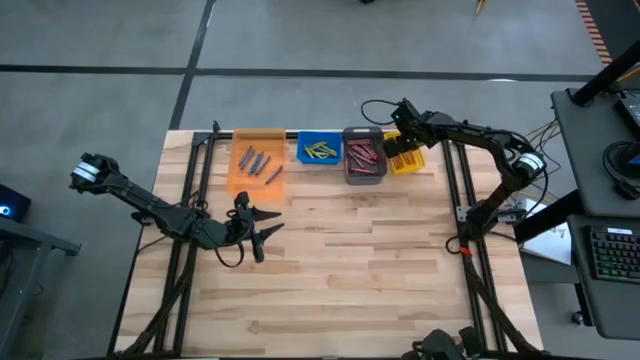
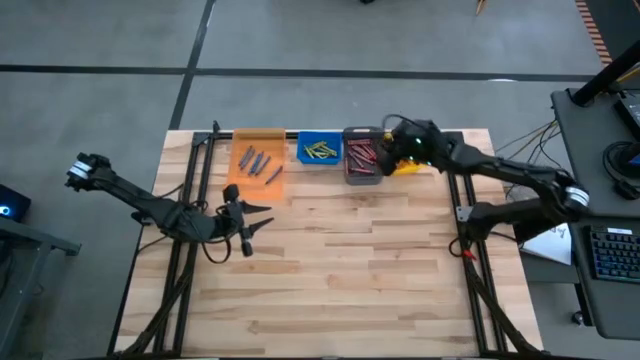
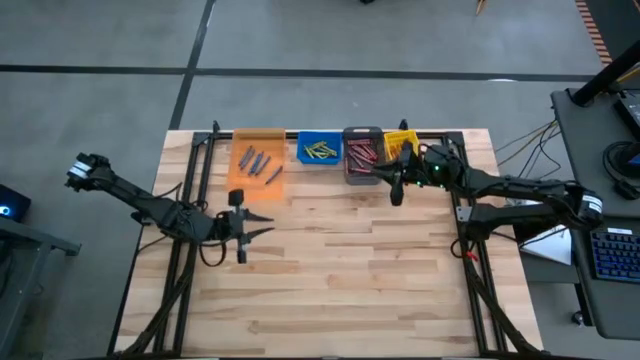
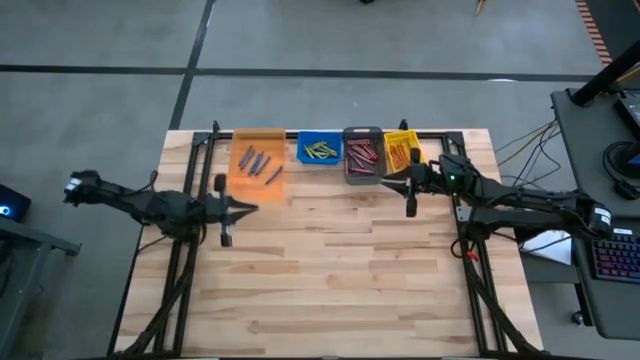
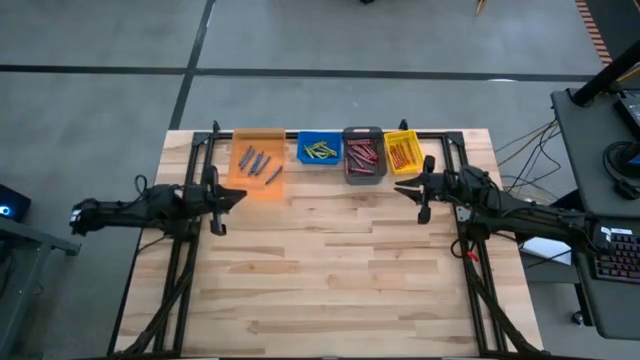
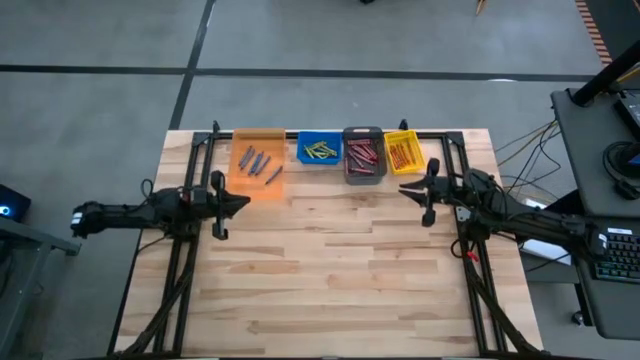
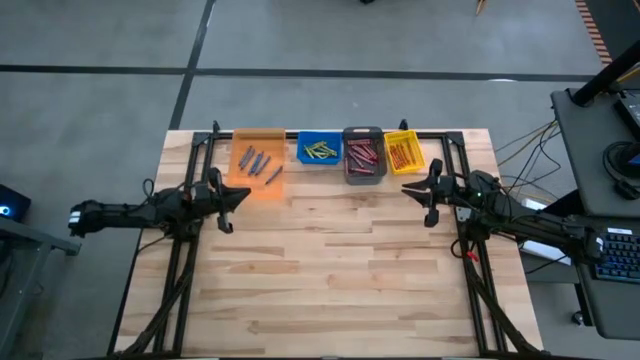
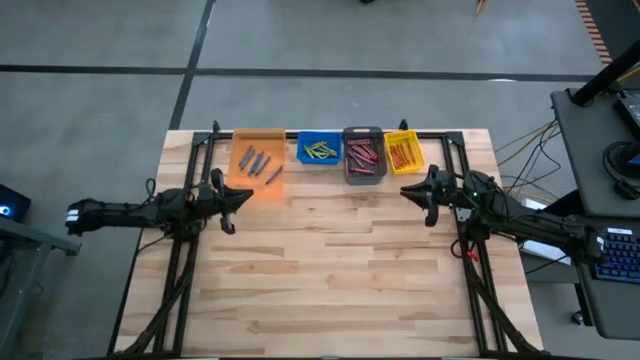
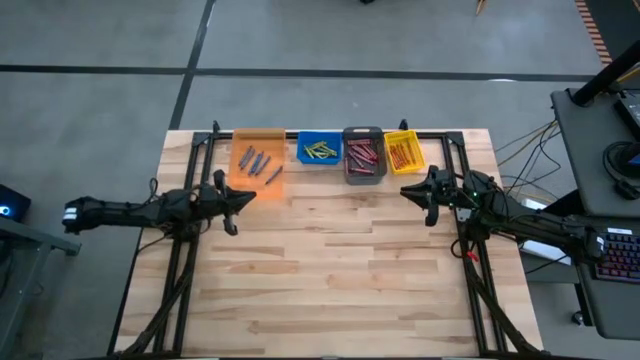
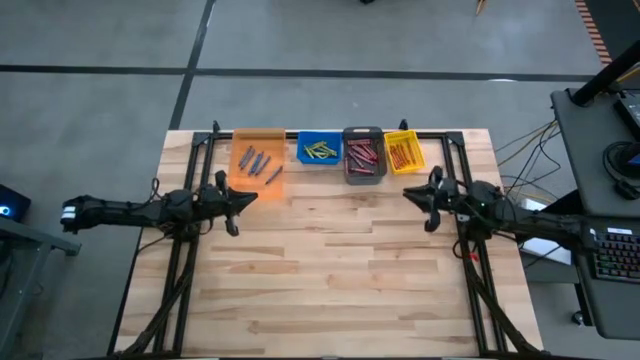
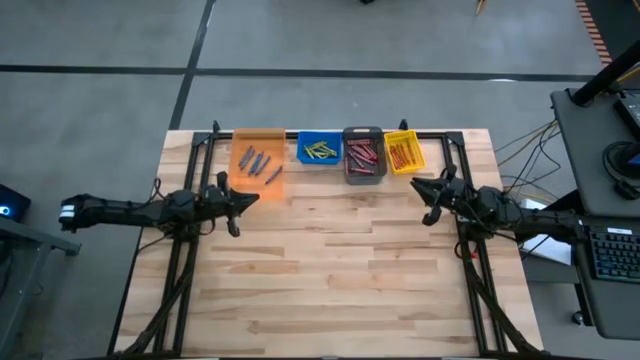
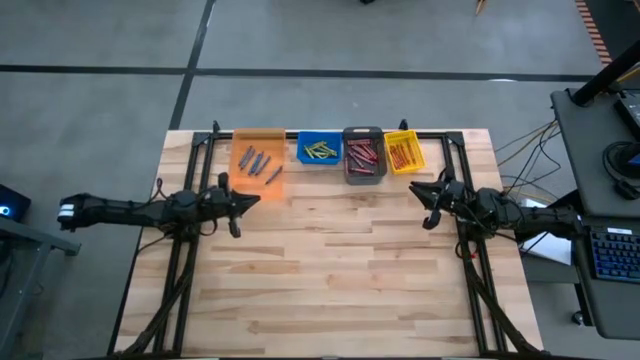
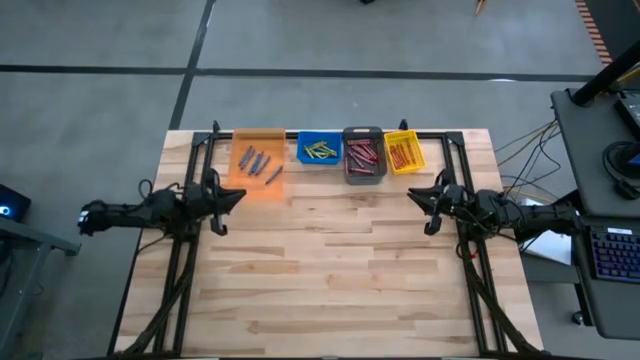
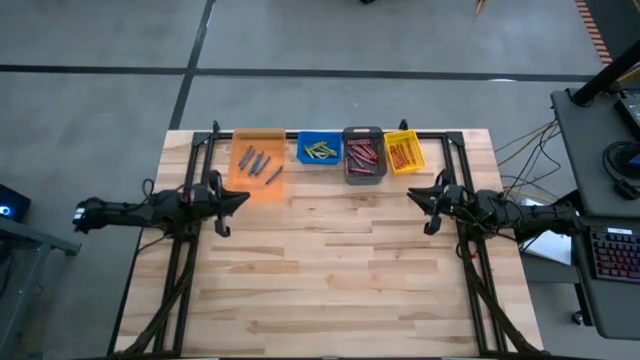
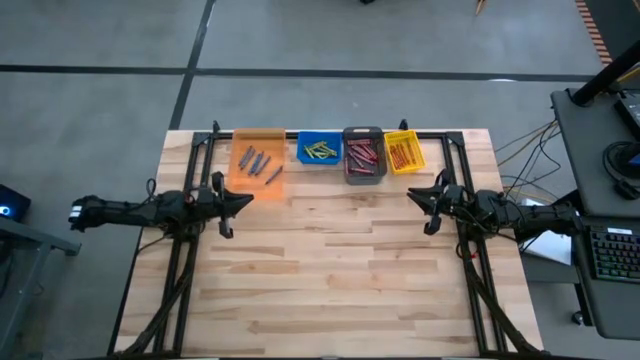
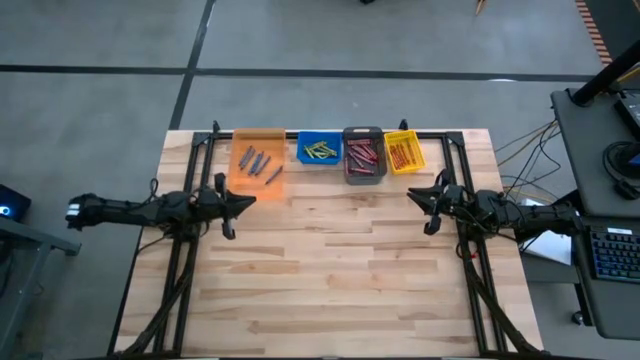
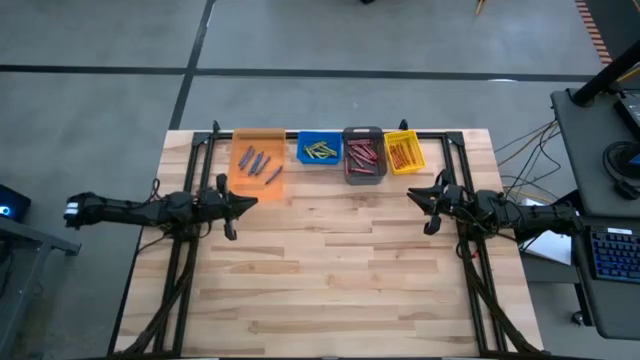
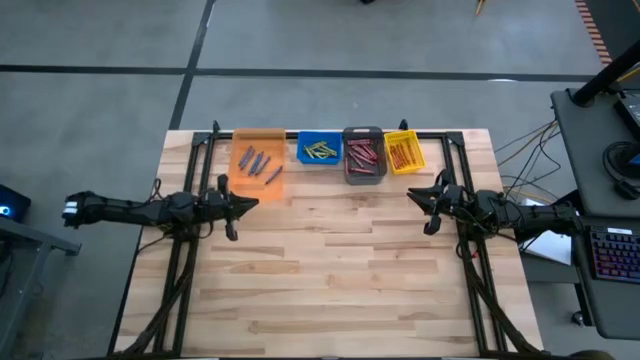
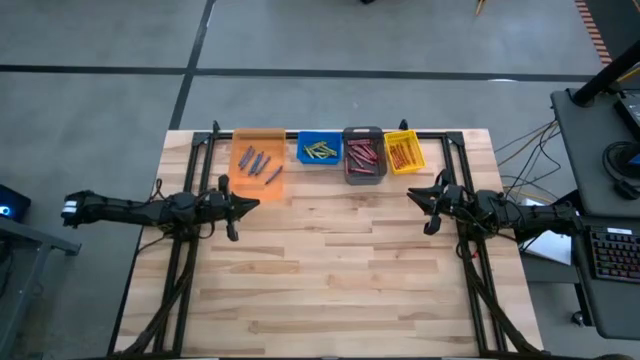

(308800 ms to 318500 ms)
Task: Sort crayons
Return to Home Position

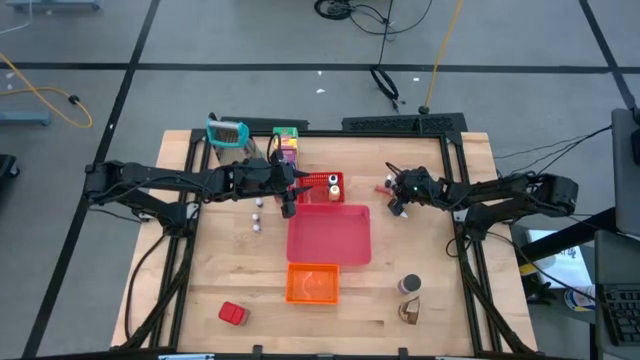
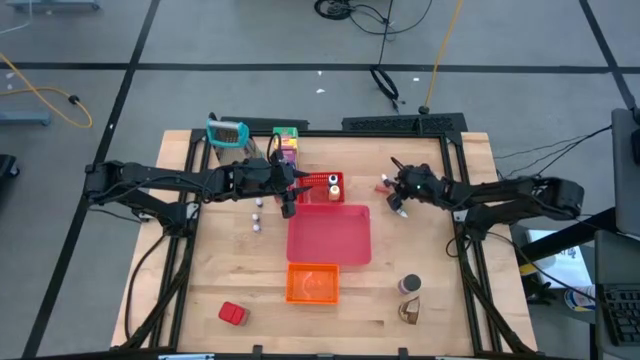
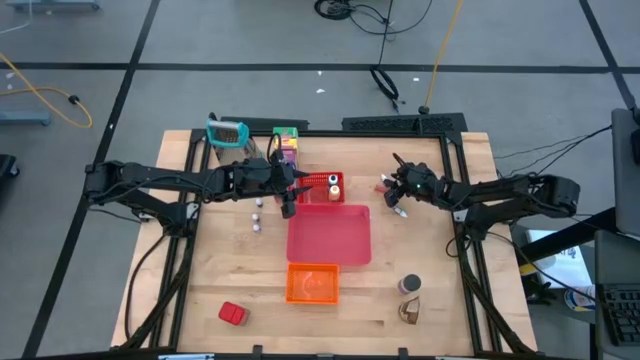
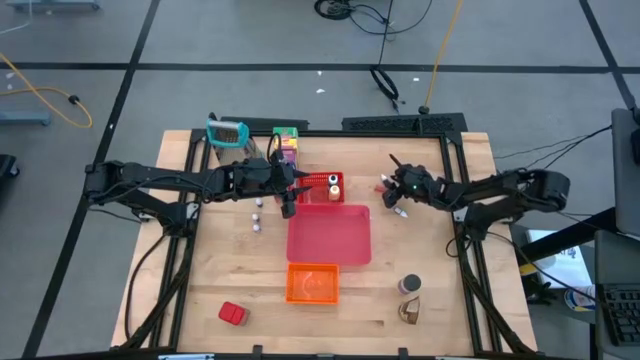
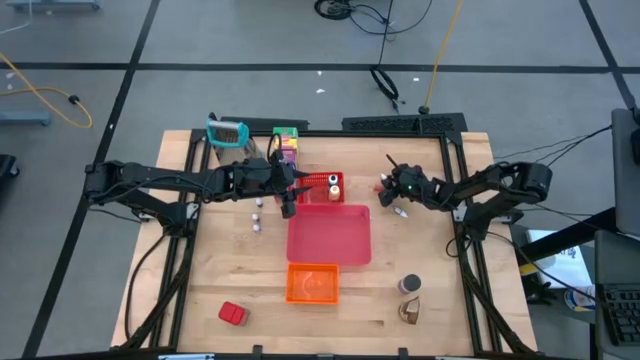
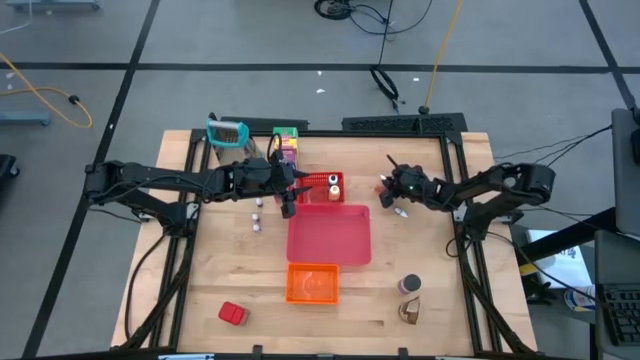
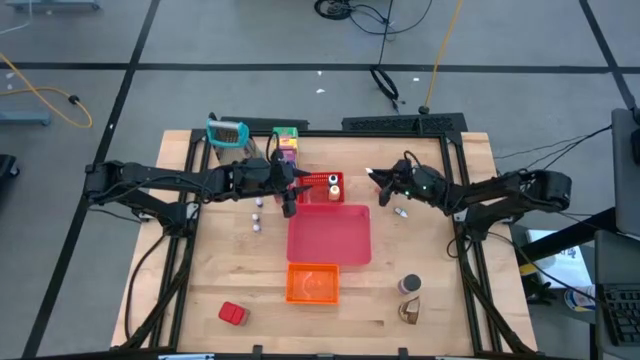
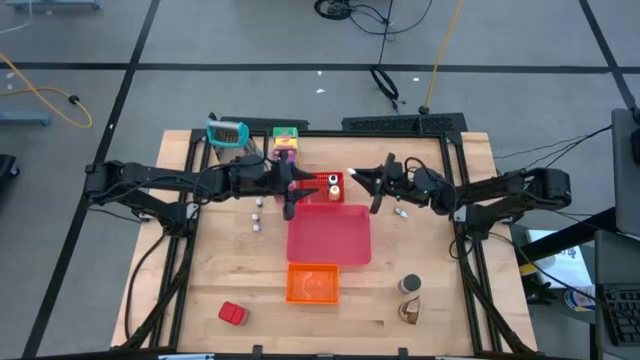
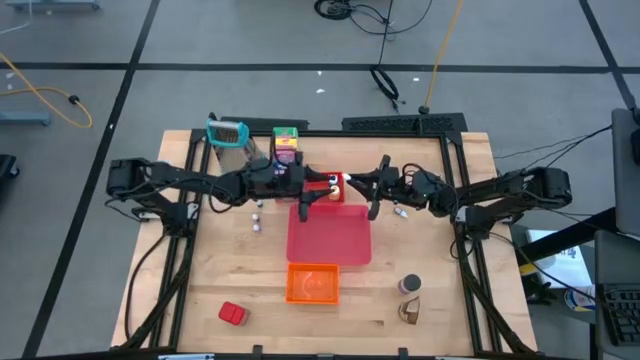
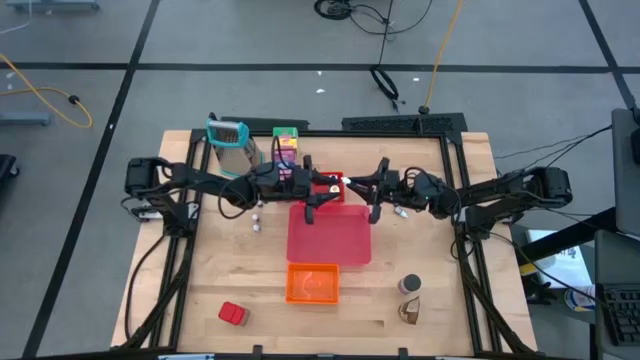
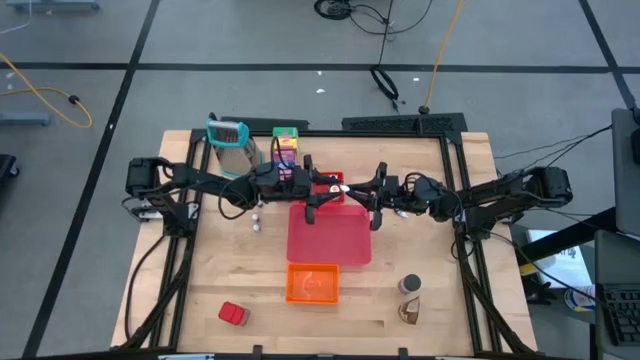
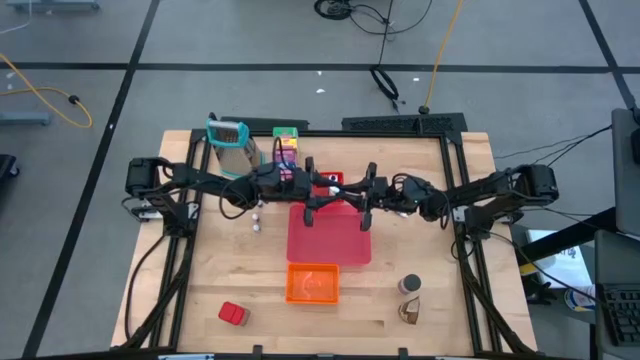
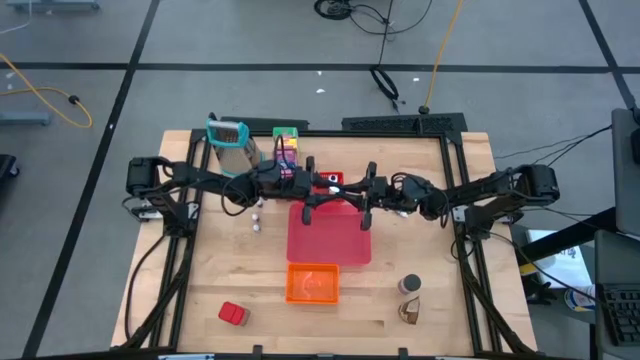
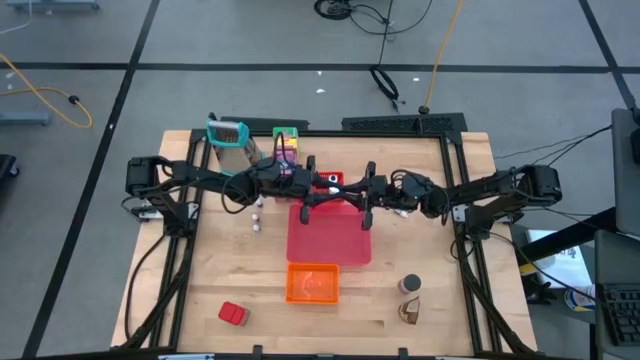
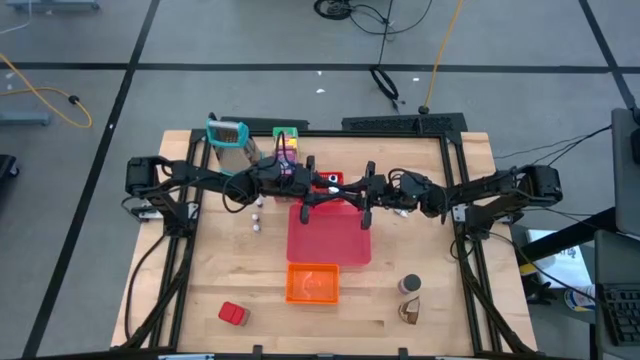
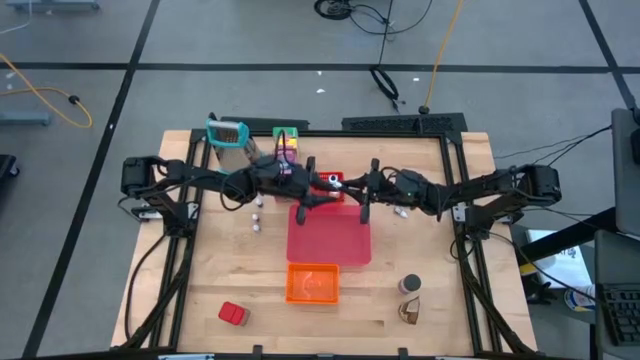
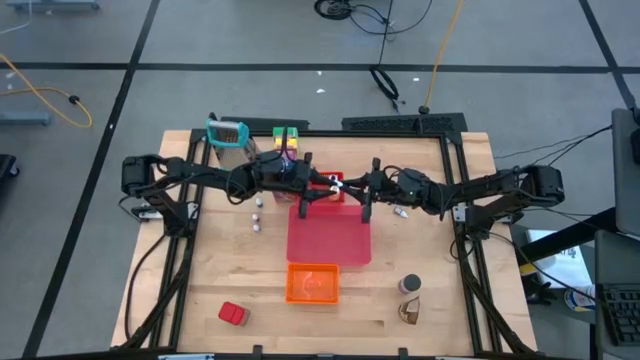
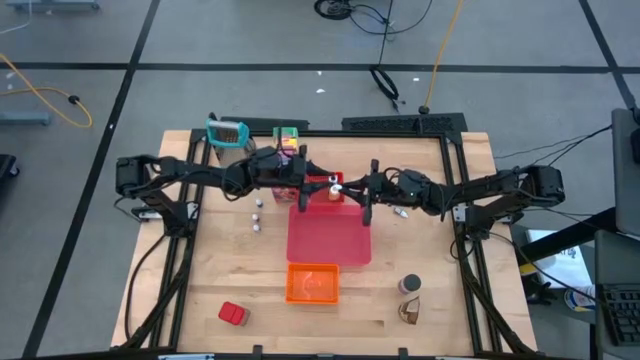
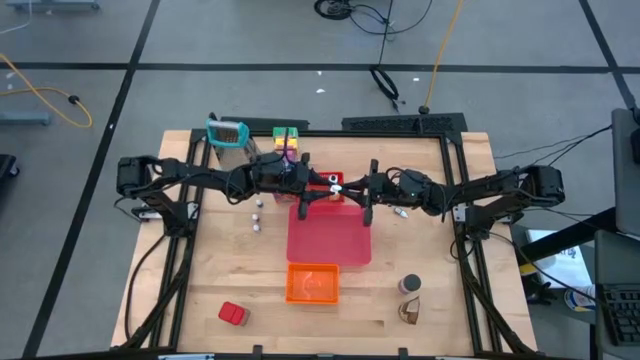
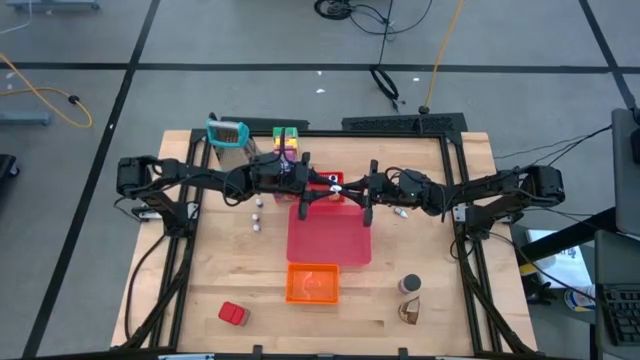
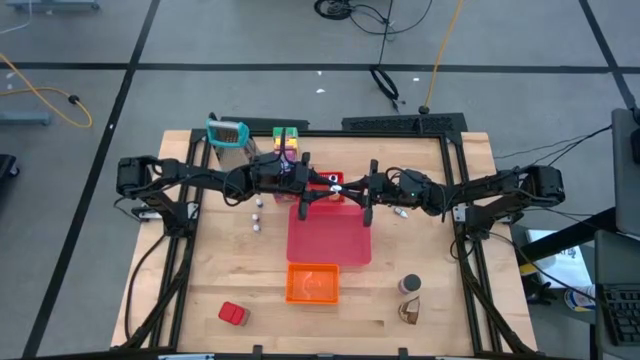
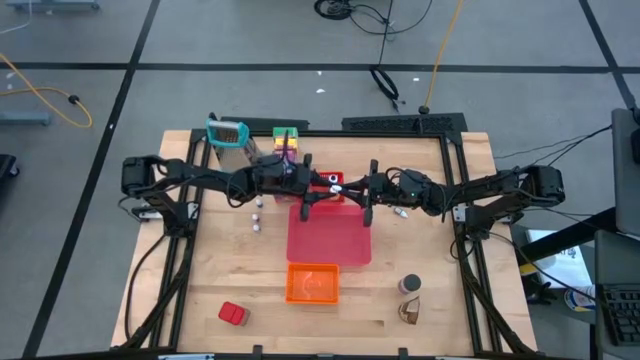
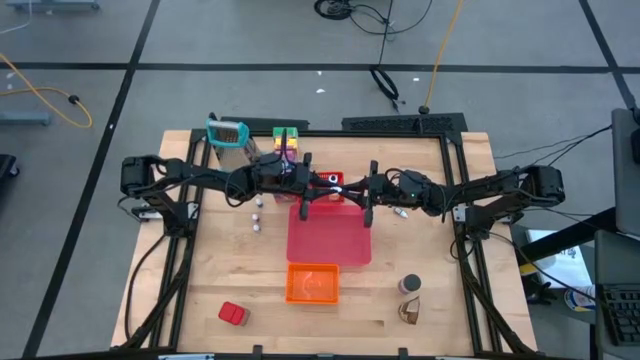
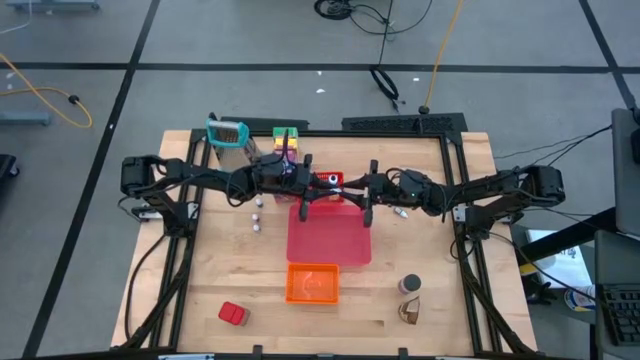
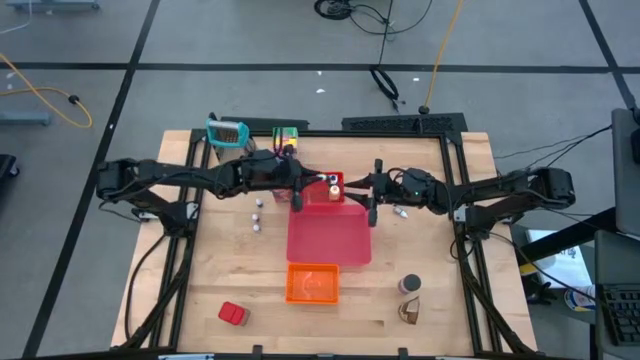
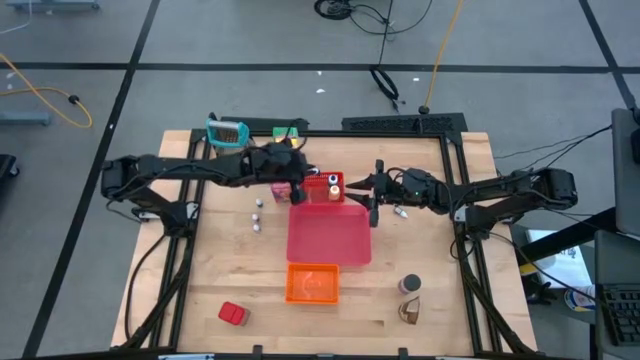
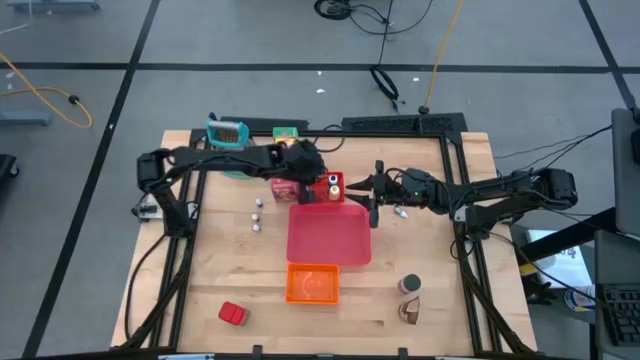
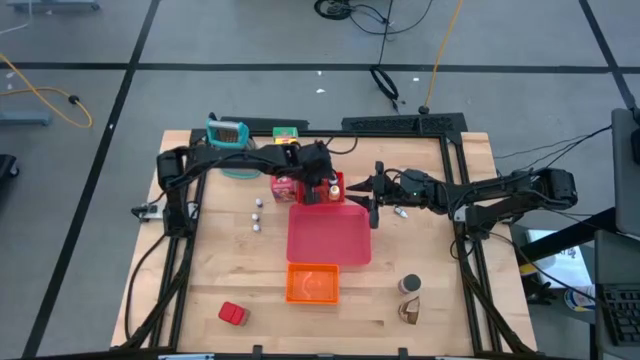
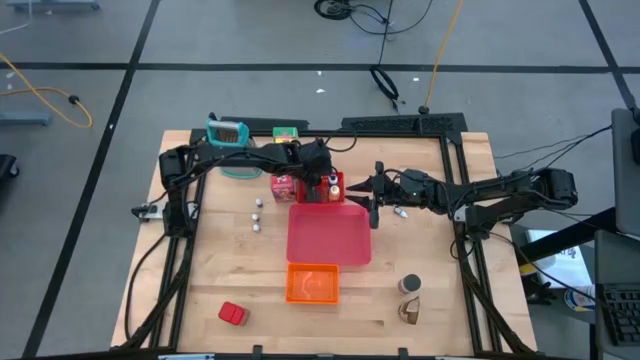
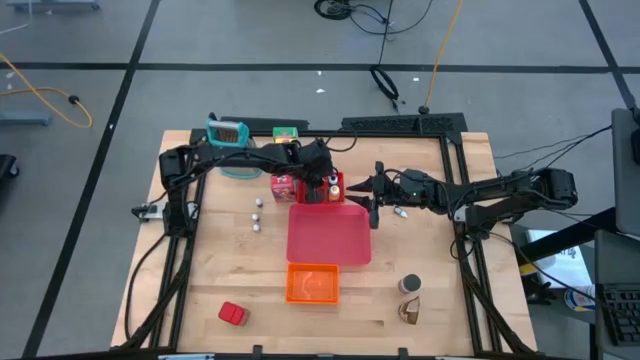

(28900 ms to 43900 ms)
Task: Pick & Place Kitchen Items
Put the violet food coloring bottle into the red bin
